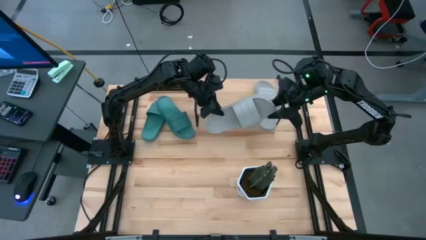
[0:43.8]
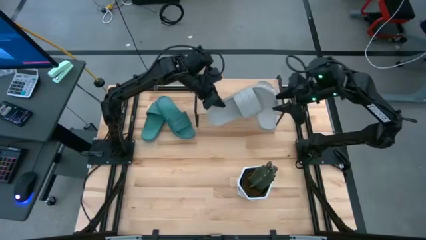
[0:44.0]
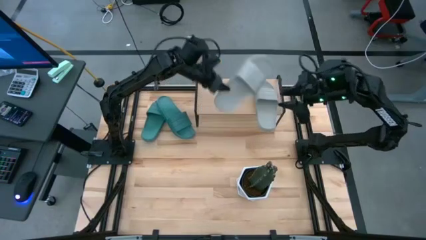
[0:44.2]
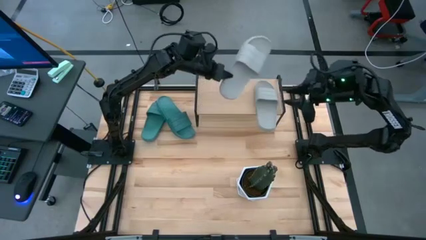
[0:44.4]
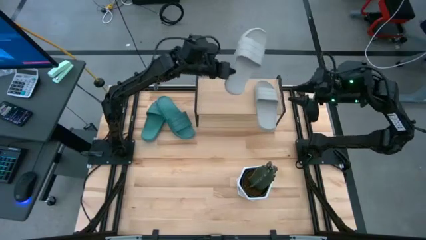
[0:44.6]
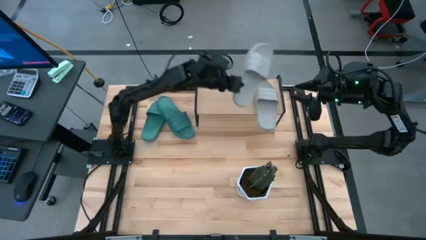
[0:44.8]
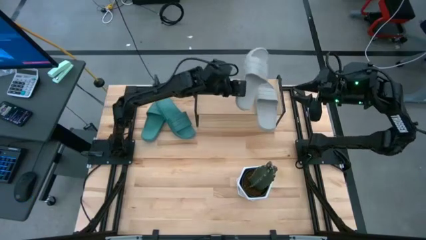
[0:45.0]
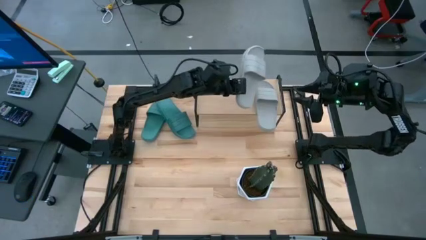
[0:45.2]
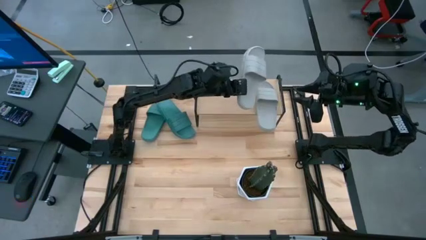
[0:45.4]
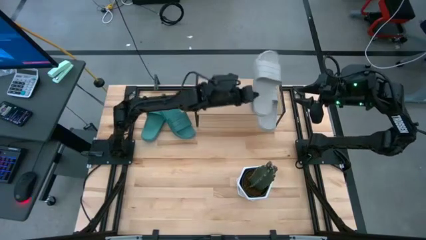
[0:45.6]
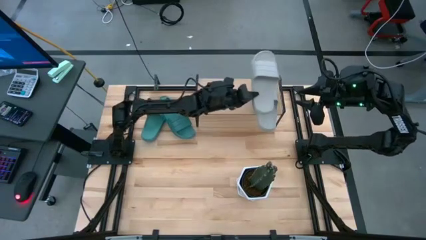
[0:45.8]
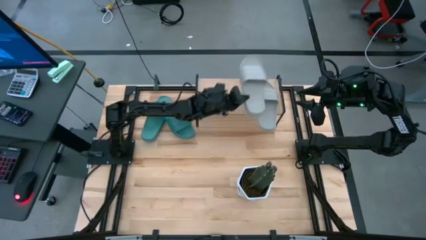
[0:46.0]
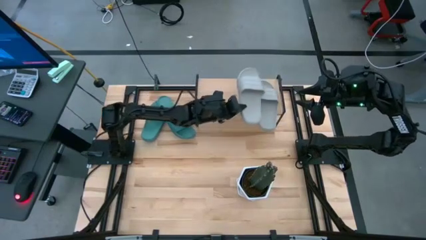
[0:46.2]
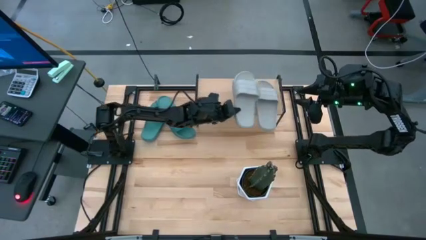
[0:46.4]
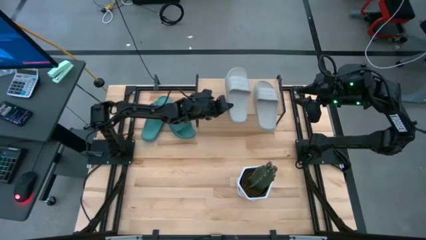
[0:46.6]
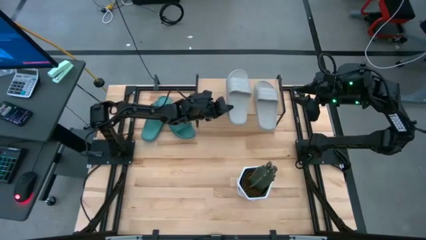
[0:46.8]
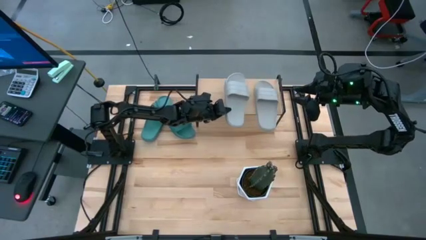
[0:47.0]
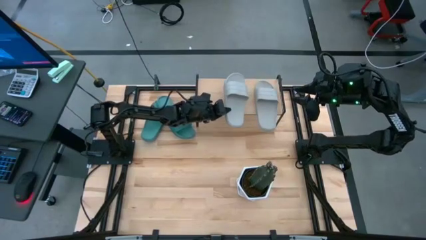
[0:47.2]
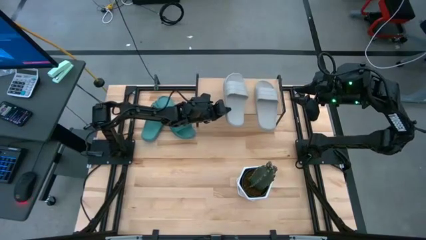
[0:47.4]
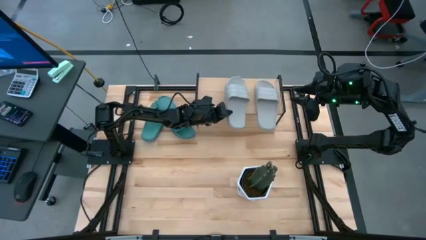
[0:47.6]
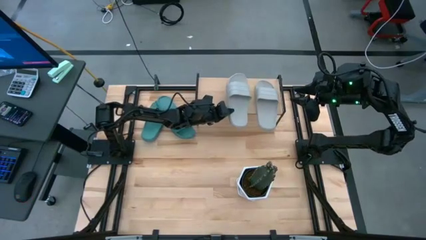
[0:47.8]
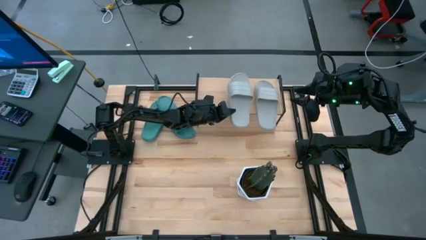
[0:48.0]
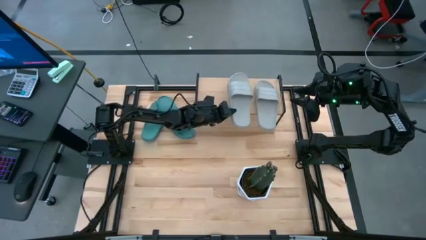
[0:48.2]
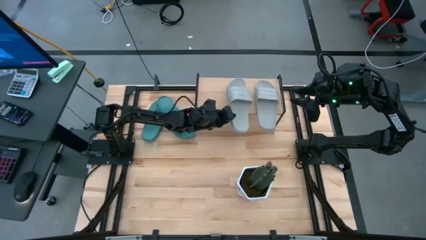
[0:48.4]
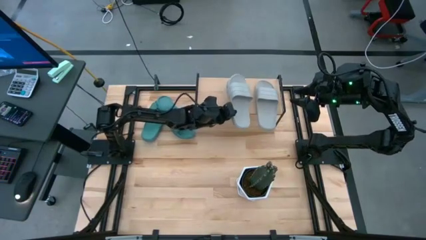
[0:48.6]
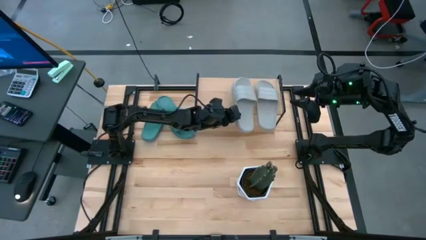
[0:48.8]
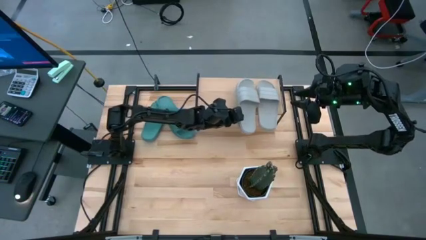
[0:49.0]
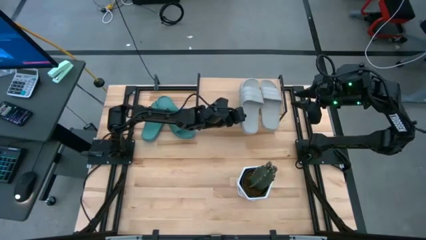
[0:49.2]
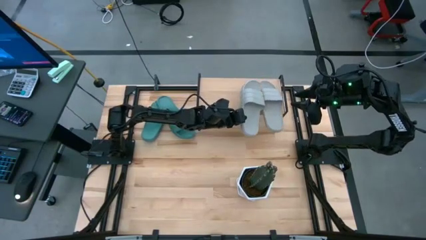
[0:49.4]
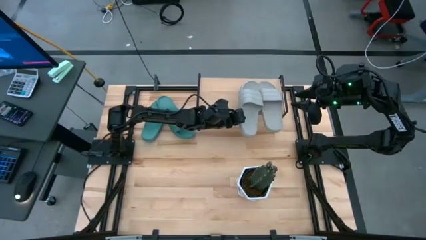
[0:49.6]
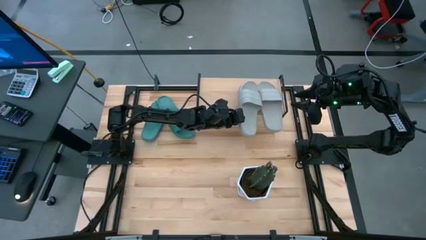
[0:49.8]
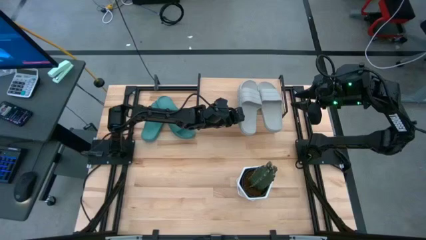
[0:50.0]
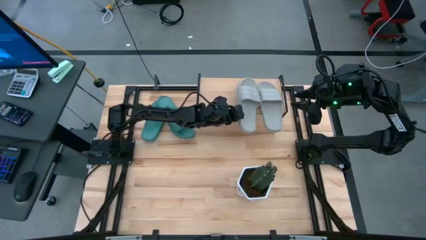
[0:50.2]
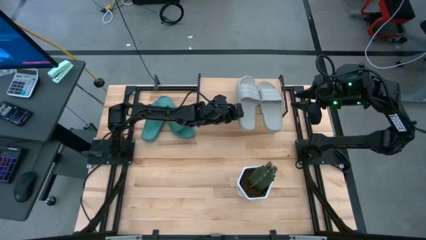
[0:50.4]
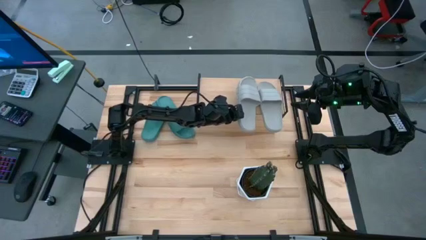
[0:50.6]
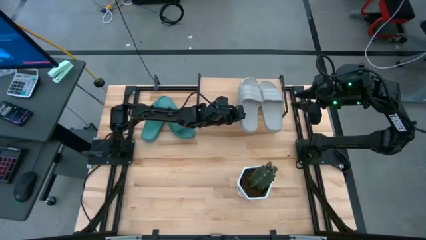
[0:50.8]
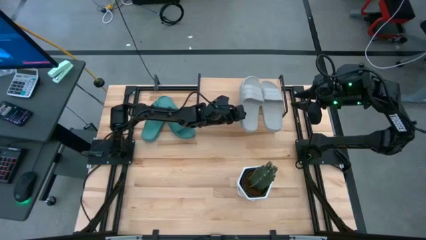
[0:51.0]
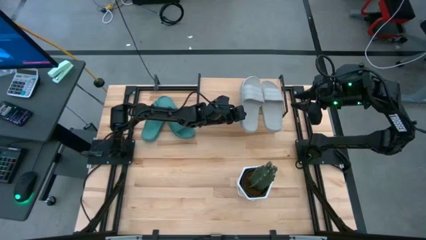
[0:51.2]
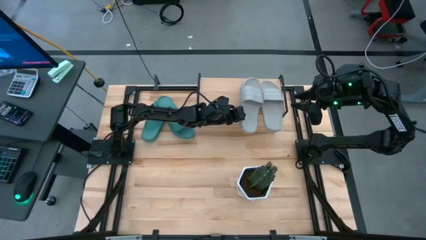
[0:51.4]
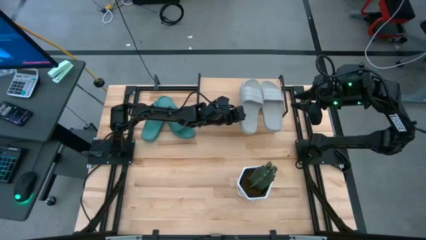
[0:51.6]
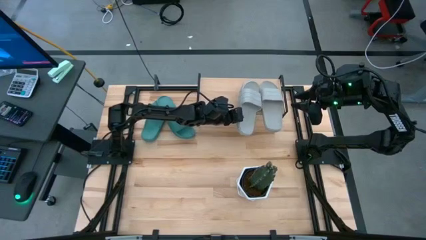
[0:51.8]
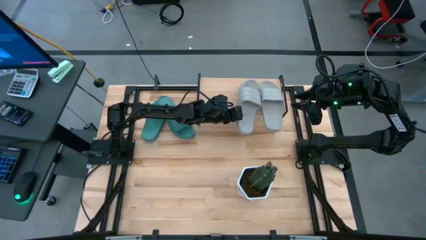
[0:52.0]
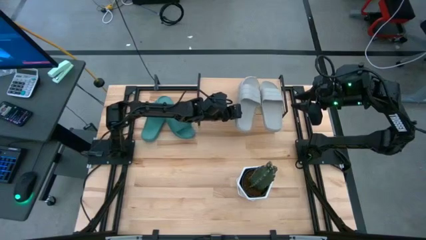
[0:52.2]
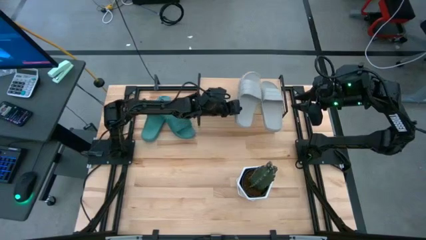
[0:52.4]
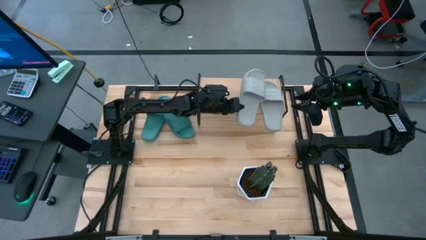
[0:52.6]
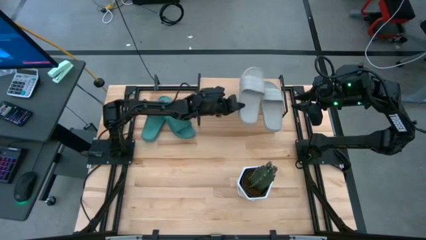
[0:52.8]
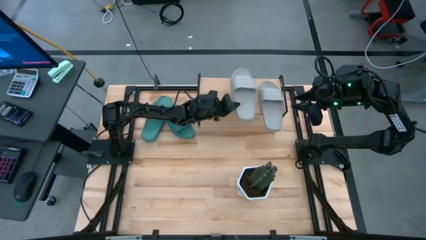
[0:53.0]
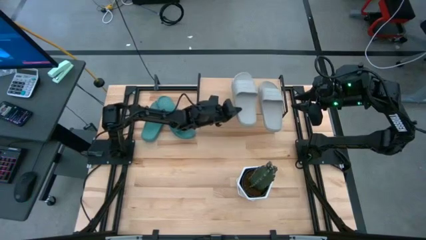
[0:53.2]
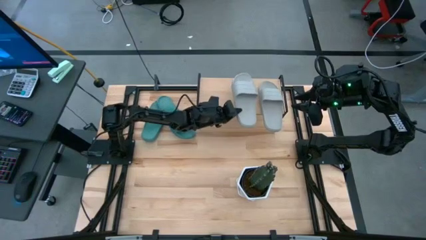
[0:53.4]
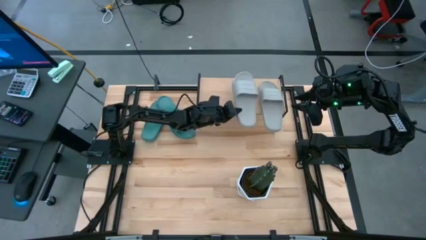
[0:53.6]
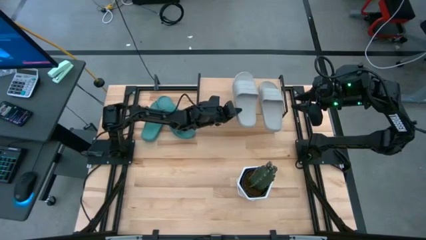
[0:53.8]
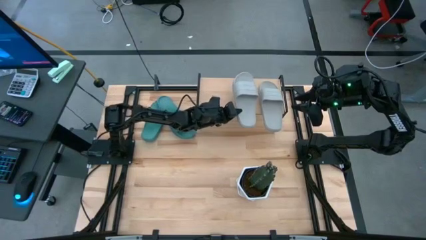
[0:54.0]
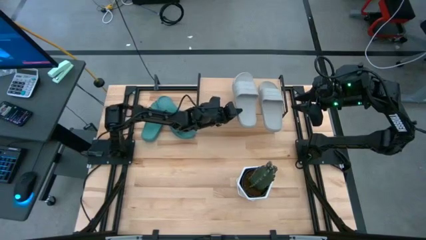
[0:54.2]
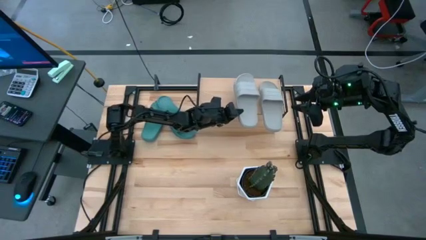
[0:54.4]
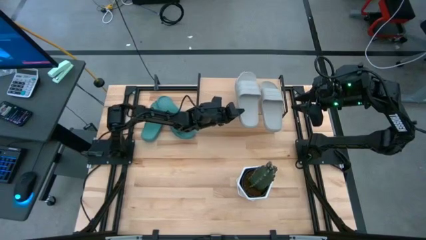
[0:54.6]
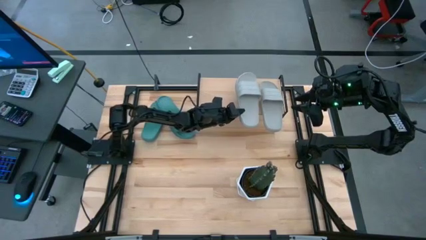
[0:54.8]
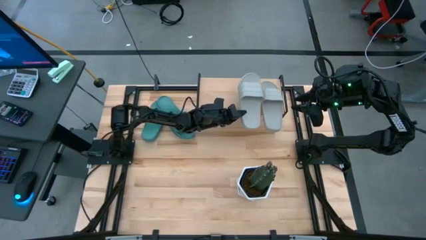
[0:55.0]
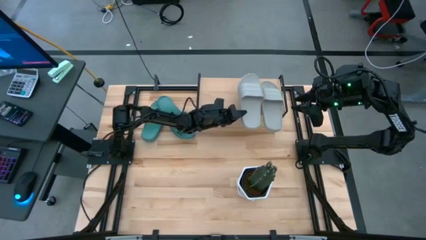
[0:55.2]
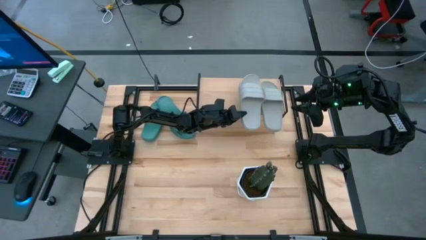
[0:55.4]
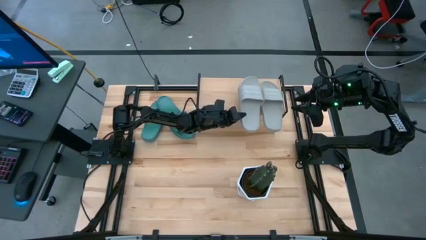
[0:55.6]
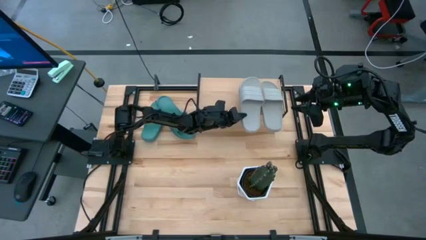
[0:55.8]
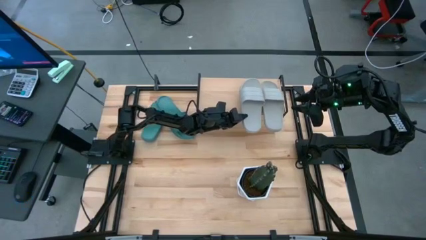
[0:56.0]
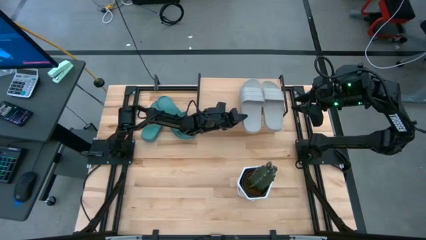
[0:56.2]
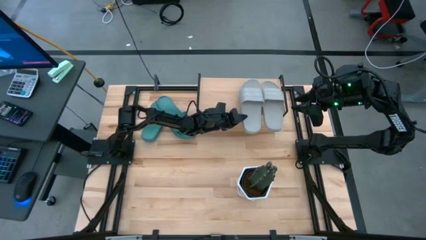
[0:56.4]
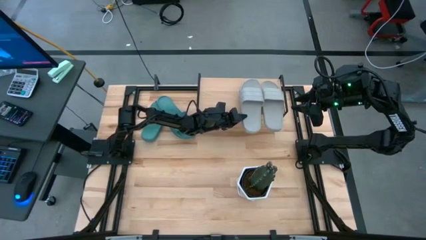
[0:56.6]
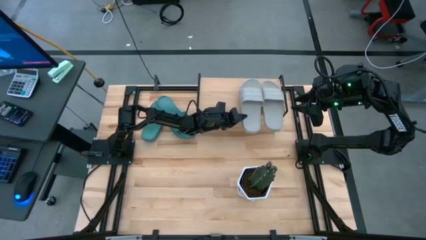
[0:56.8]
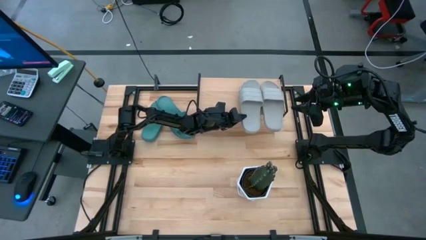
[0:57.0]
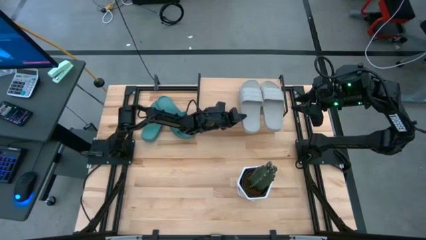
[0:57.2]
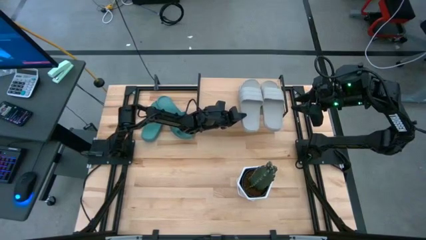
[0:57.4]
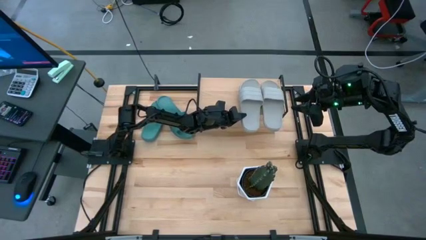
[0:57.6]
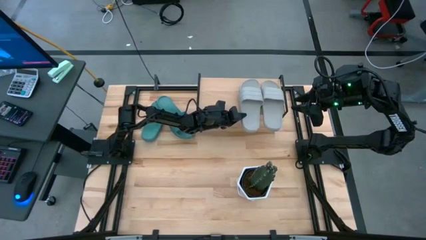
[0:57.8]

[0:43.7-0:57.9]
Task: Pick and place slides into the shelf
Put the gray slipper on the shelf
